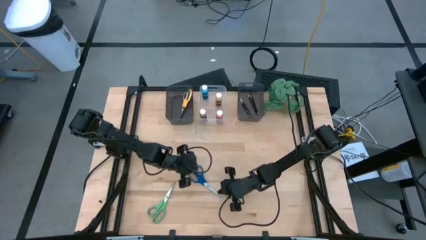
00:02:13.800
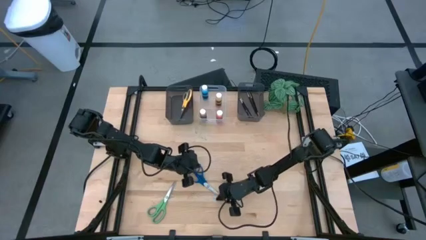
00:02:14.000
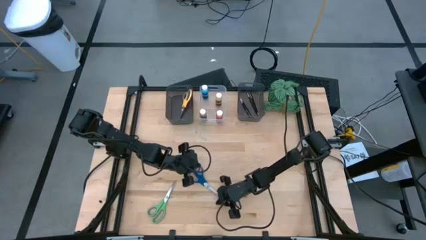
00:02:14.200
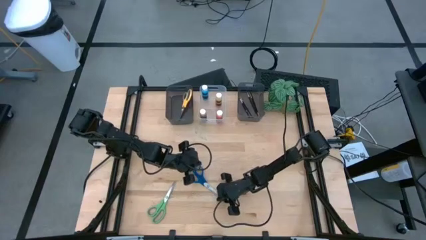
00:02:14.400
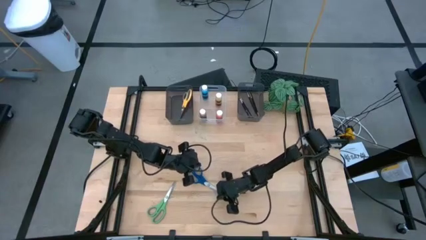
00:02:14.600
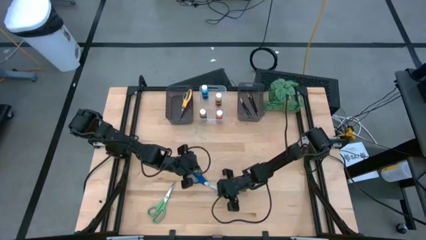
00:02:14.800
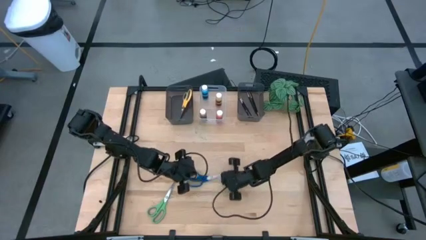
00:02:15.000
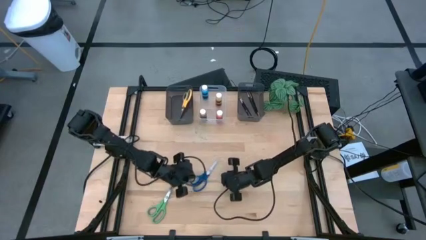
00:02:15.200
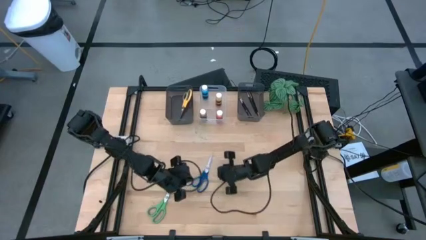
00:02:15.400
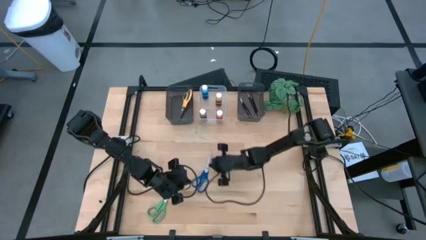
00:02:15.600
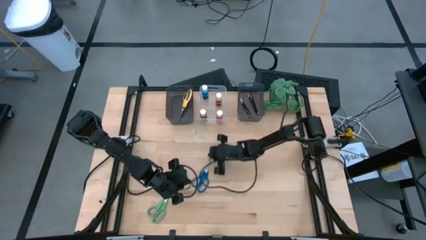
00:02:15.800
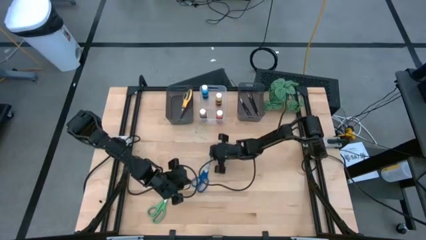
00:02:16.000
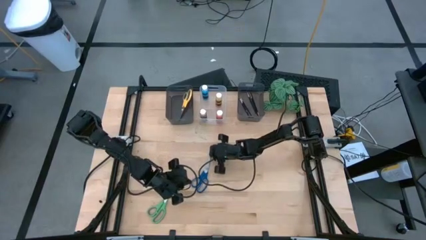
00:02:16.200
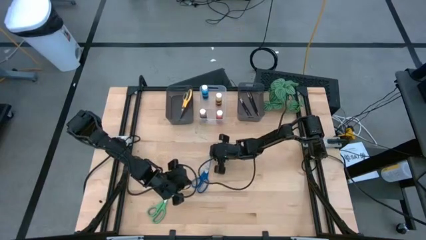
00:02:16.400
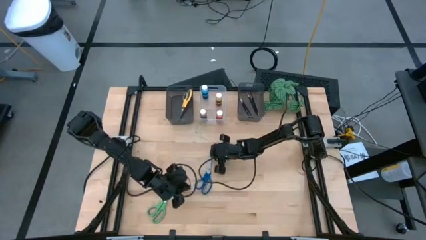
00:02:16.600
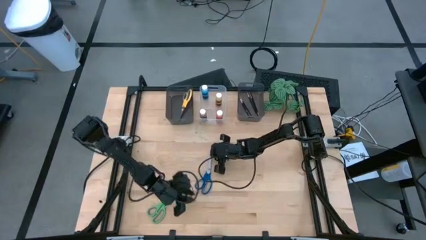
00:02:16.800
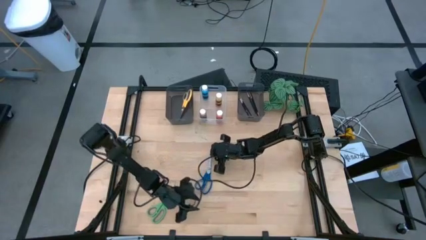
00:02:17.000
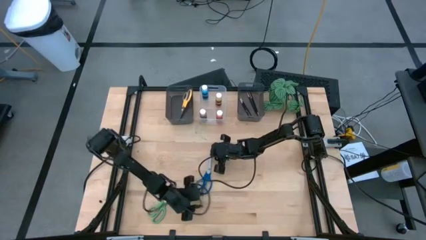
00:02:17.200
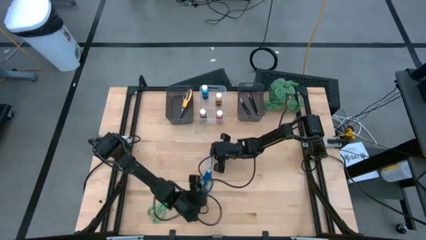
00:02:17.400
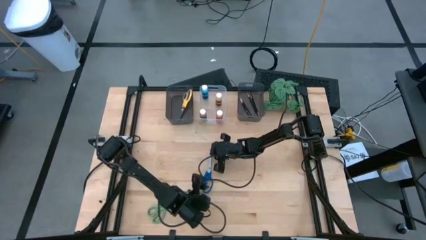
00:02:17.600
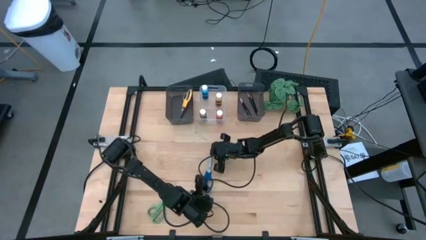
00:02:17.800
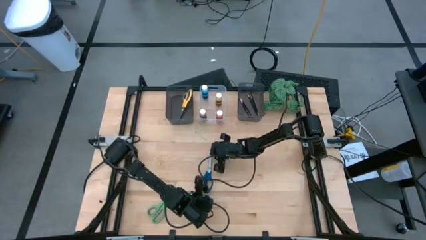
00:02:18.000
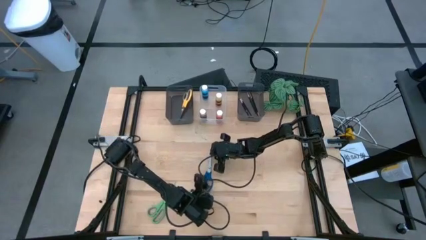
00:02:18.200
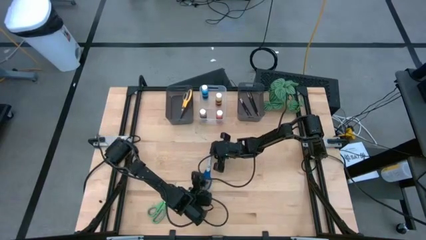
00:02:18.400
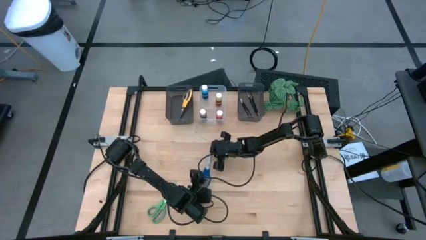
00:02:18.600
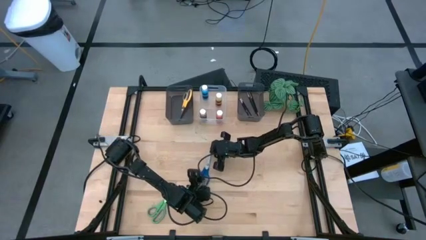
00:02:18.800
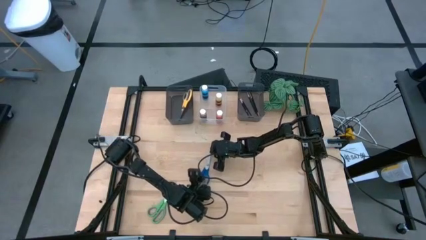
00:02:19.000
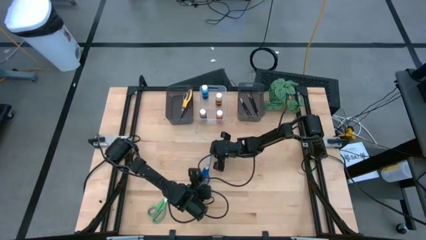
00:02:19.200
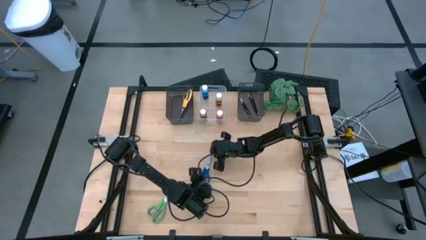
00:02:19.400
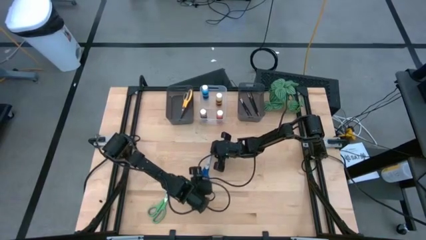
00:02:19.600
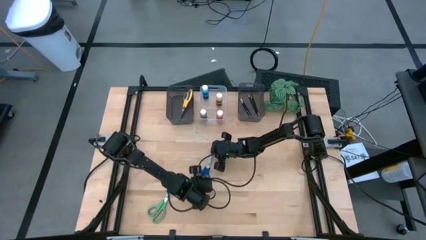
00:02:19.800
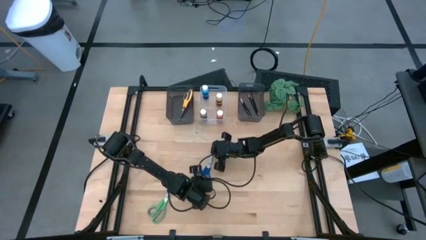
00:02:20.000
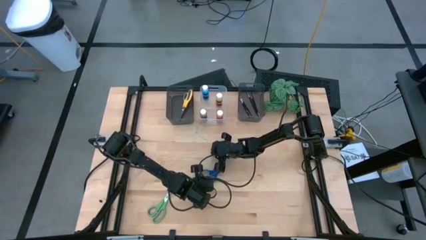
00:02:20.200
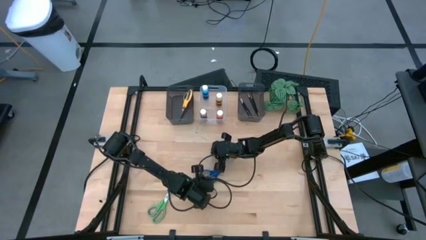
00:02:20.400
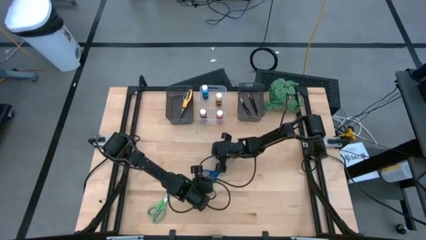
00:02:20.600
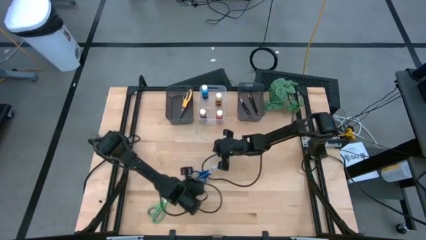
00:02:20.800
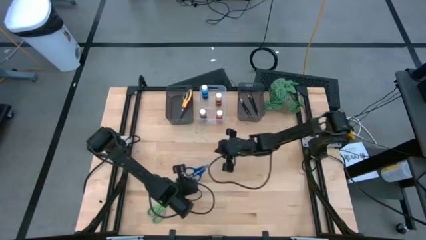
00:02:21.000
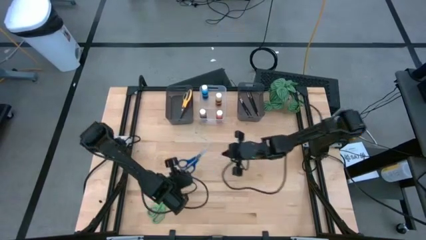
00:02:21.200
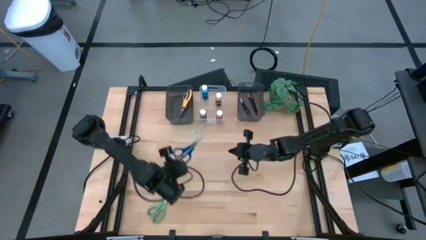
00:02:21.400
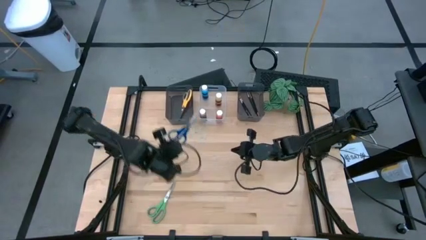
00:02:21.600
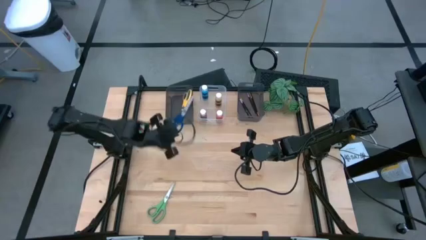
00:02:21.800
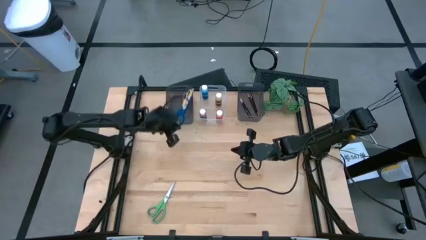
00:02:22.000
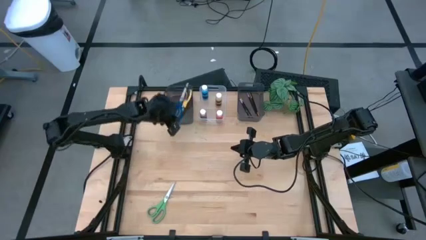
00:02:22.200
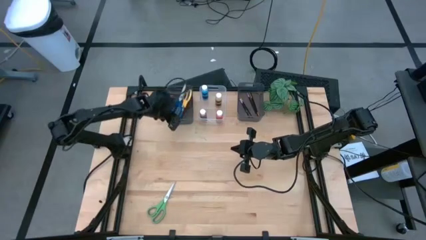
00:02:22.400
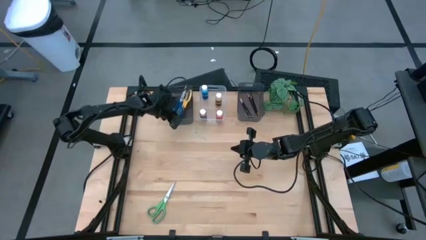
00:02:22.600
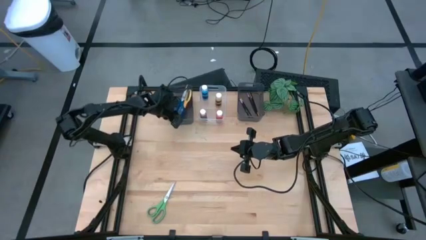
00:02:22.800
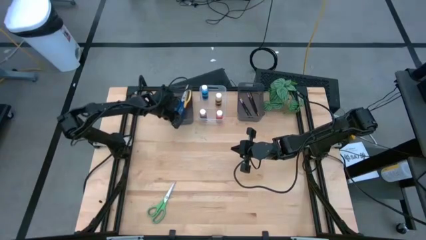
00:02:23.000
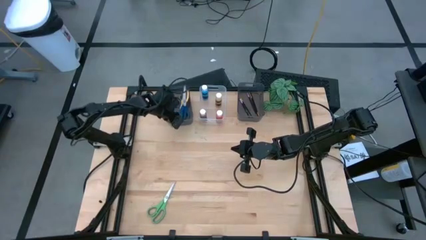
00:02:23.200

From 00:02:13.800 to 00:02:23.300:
Task: Pick & Place Paint Supplies
Put the blue scissors into the left black bin
